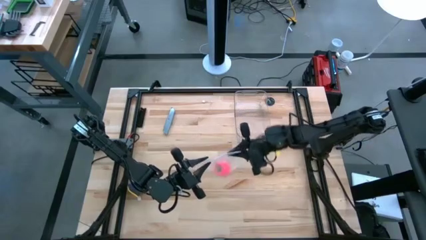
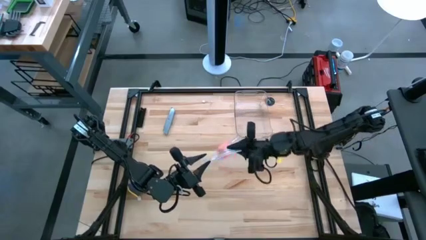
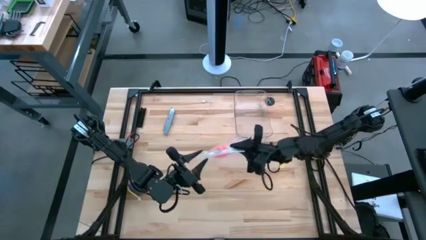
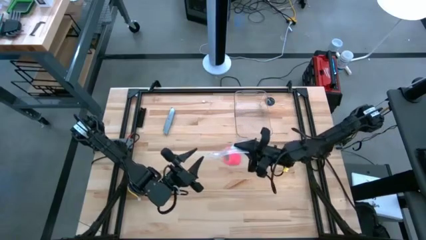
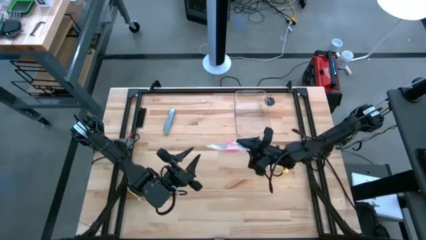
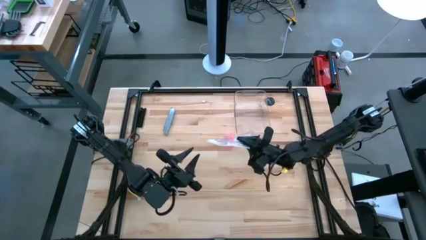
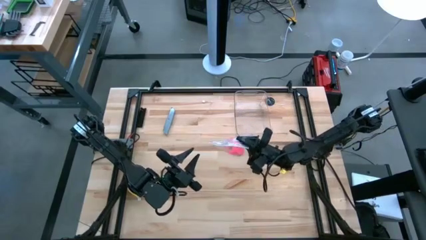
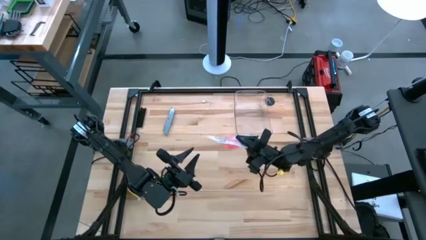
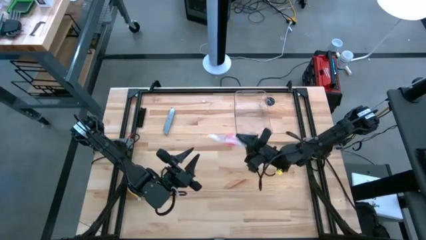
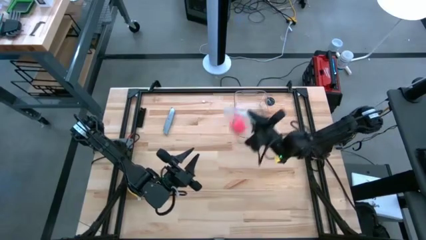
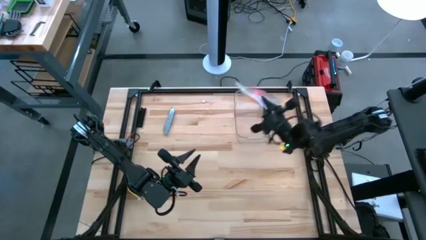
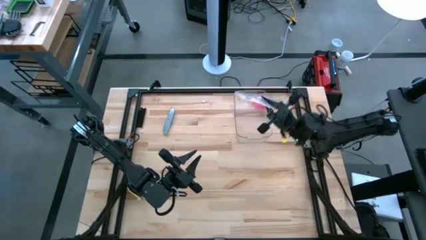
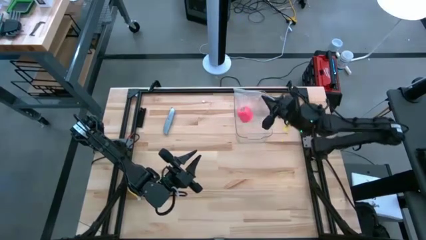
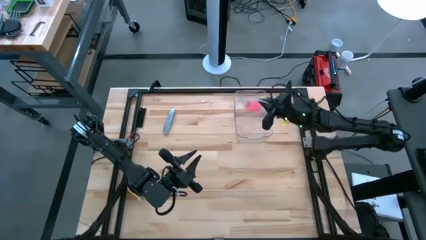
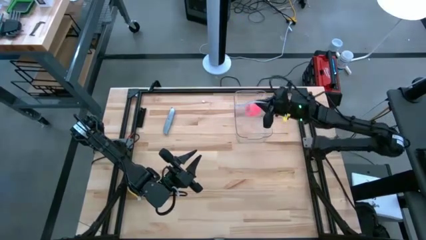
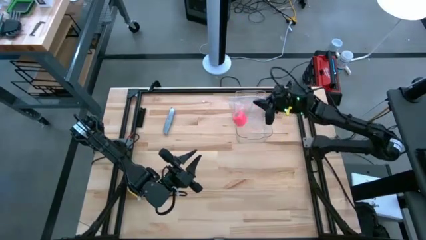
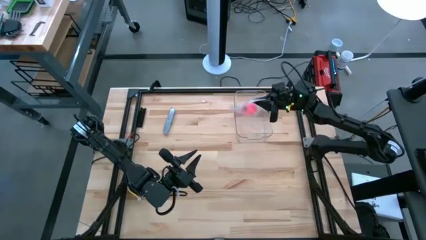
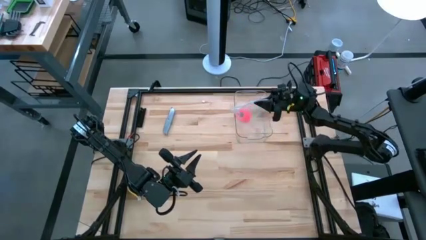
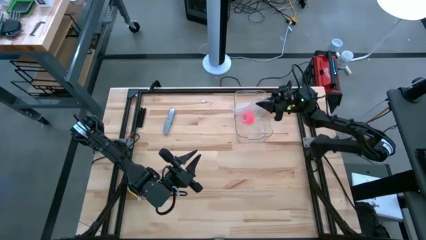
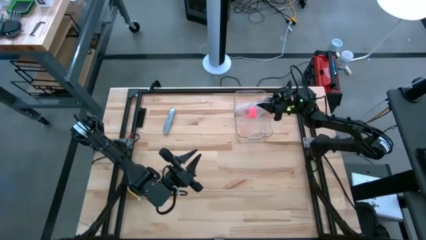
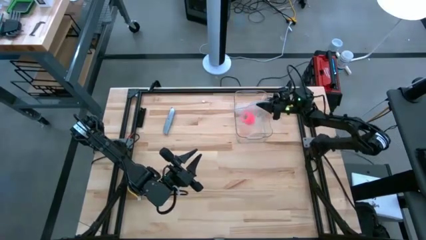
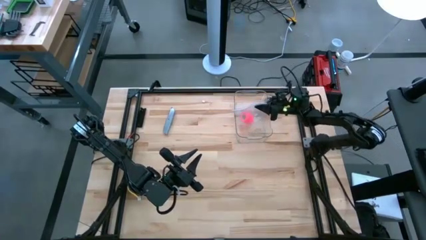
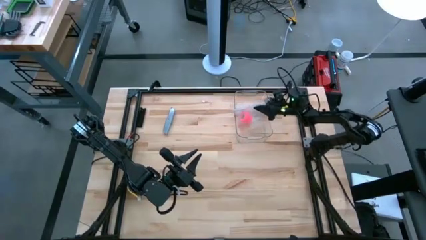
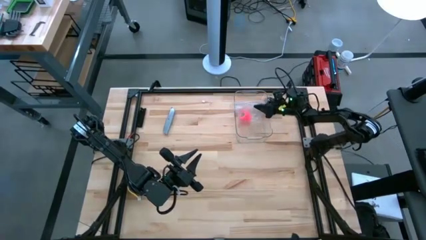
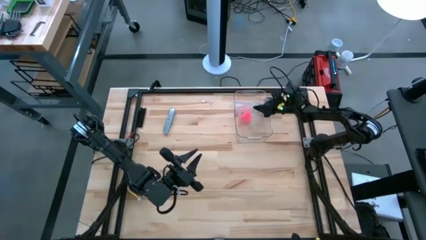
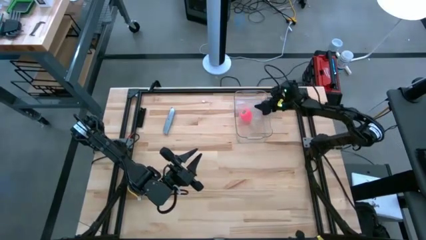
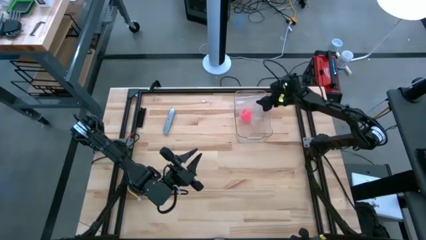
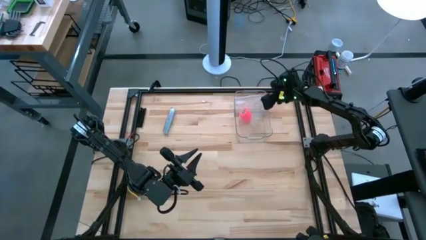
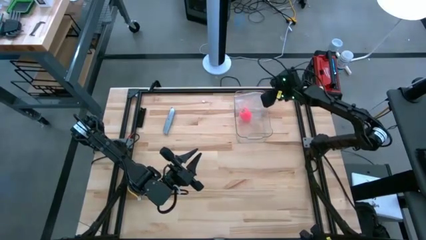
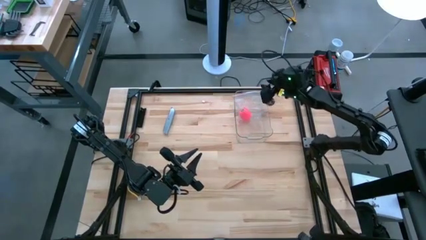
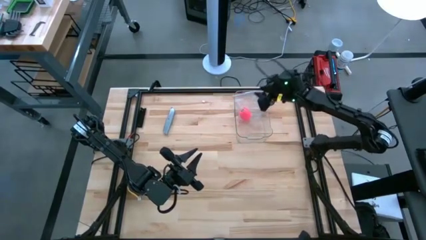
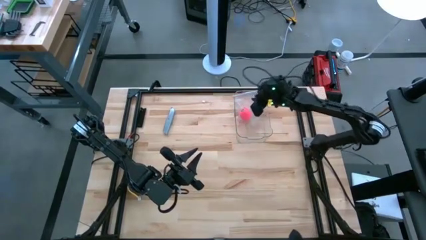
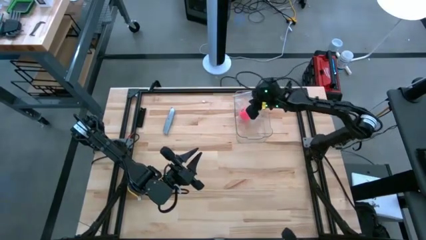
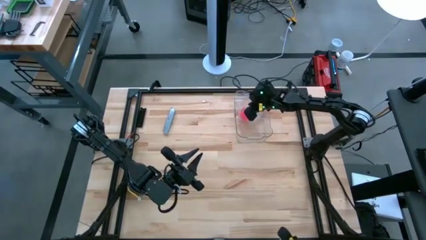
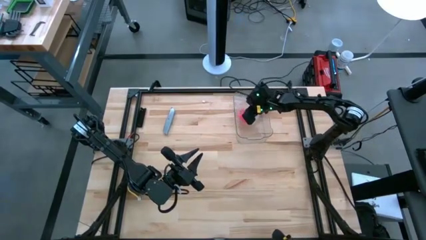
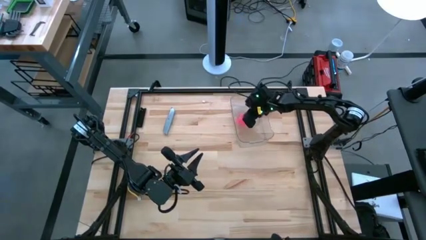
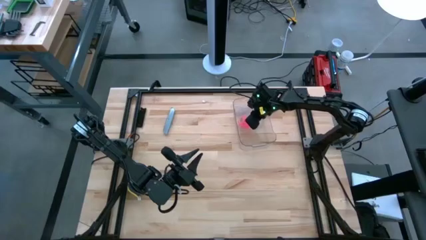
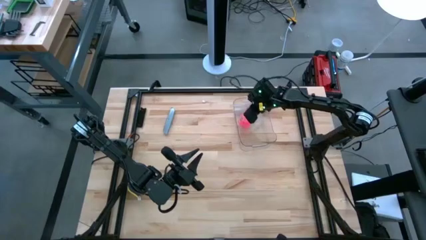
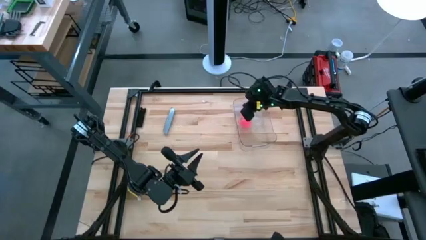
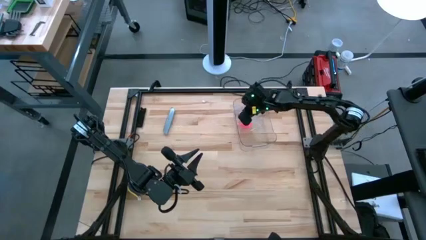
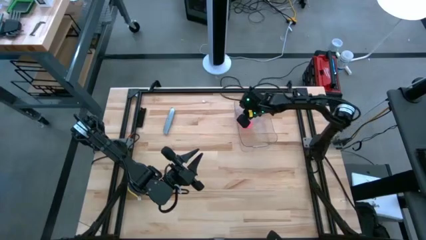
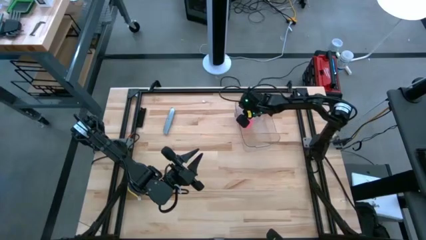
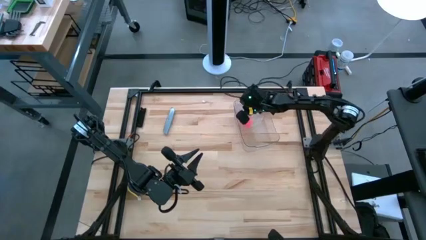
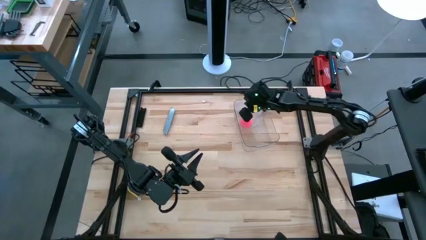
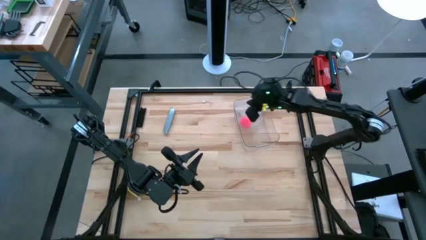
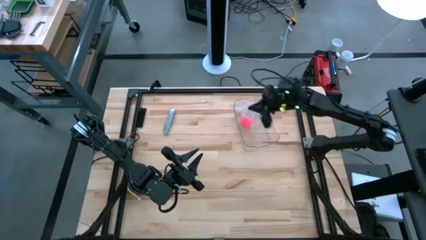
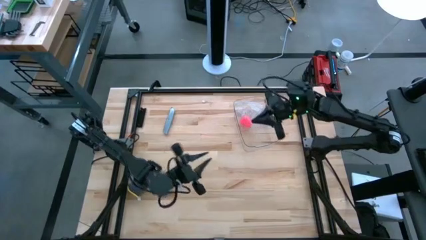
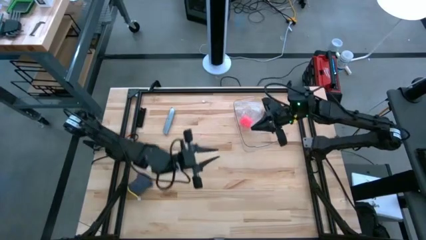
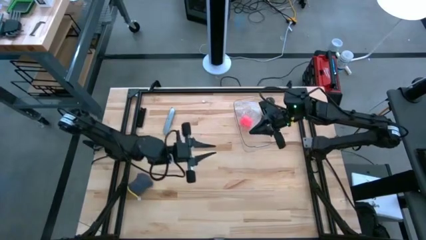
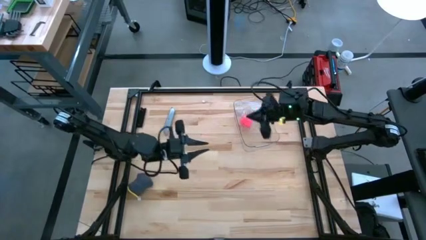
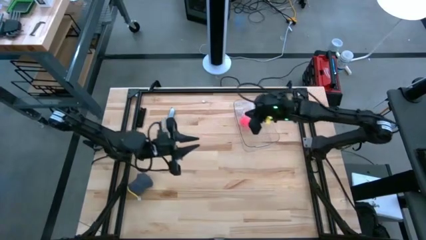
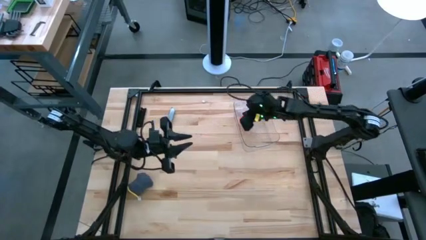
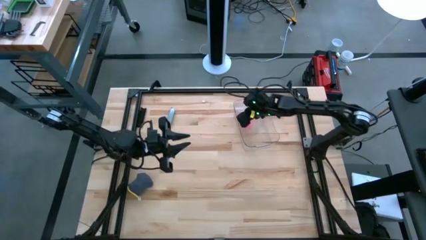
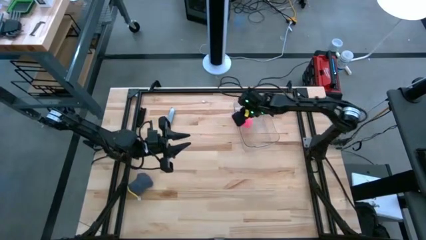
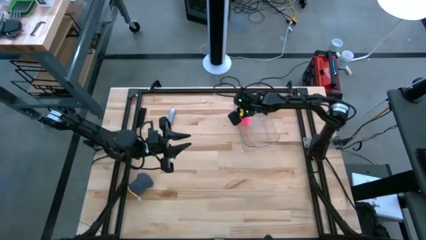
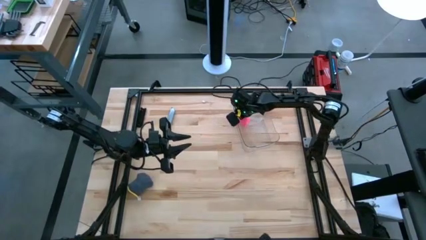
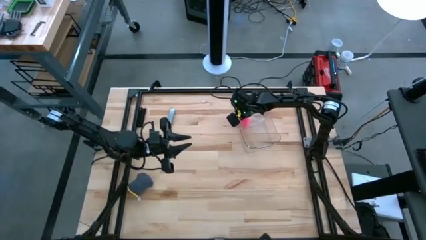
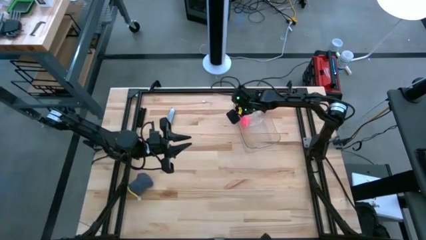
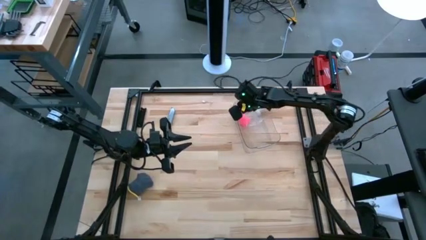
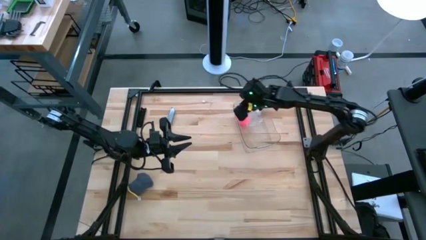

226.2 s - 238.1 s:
Task: Roll bandage
Put the transparent zip bag into the transparent bin

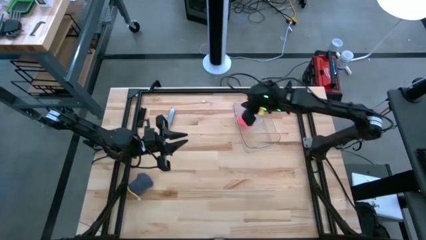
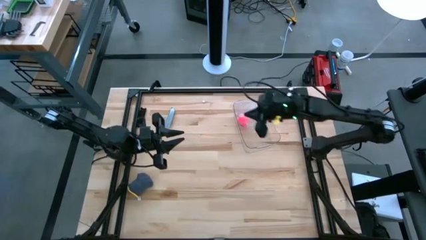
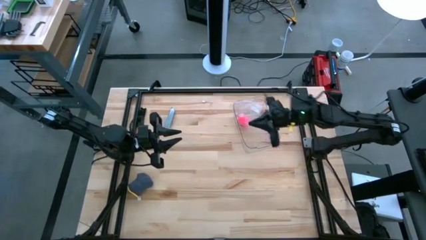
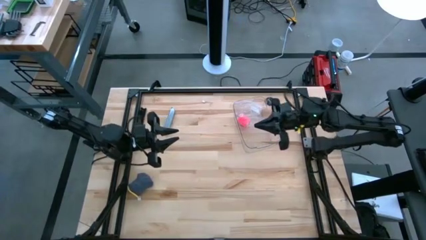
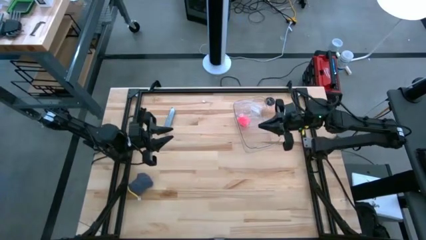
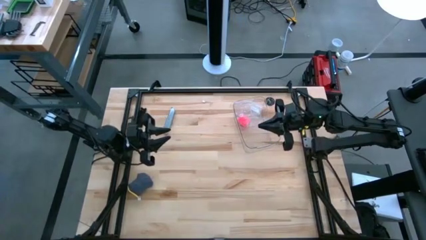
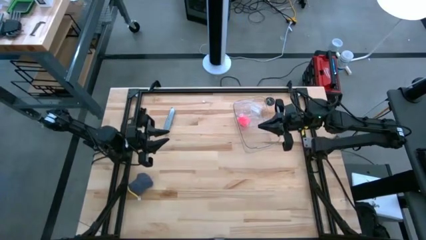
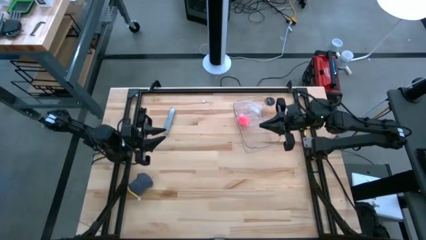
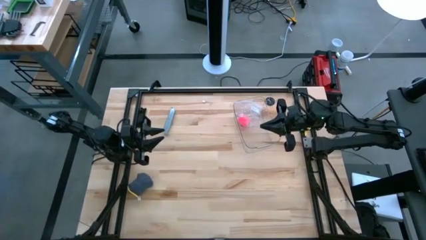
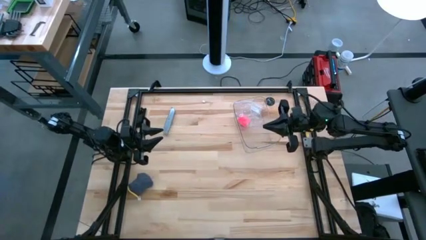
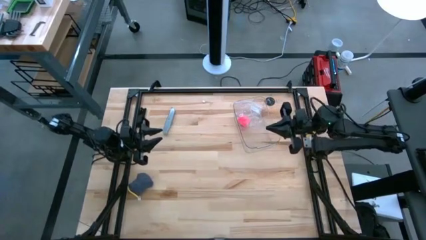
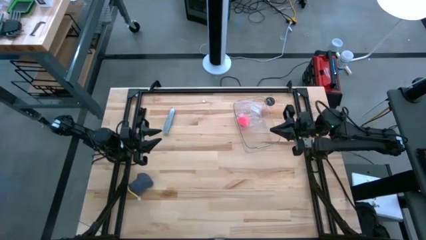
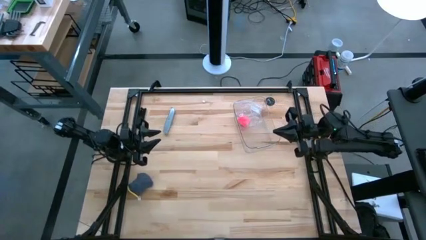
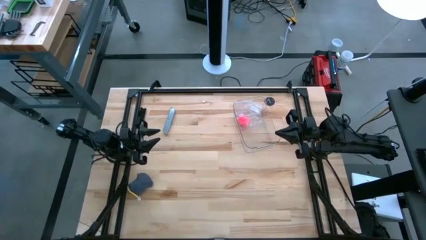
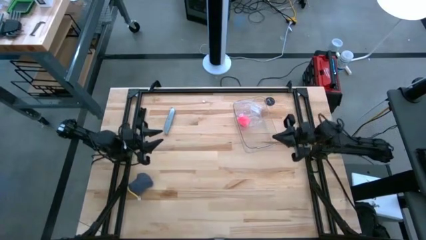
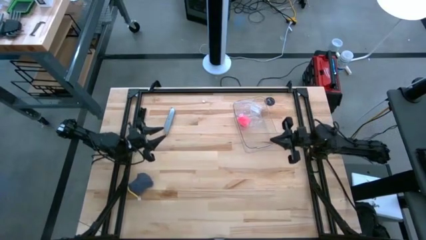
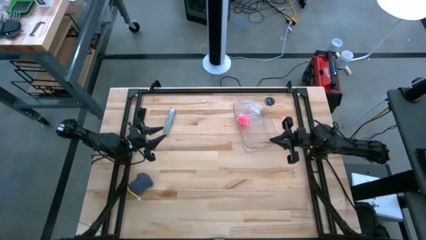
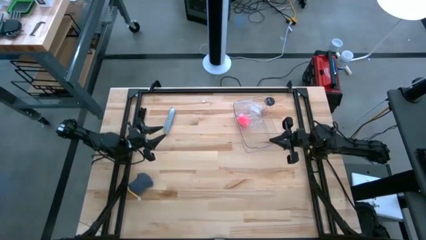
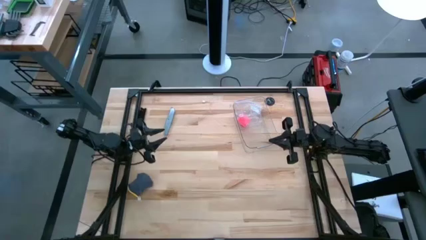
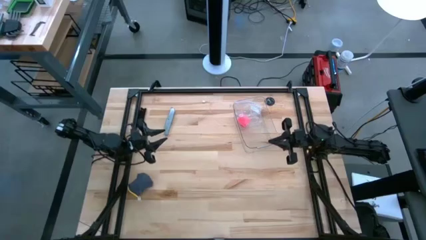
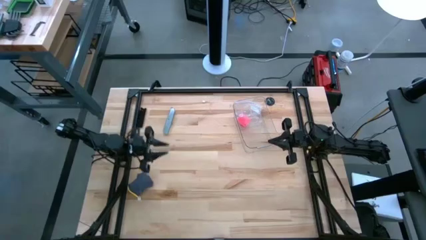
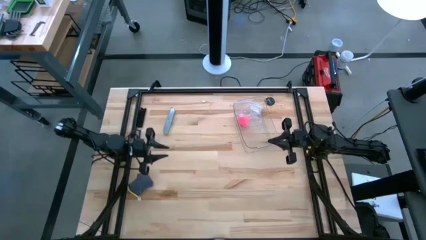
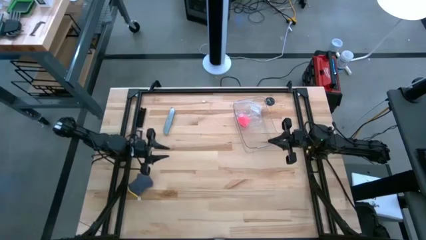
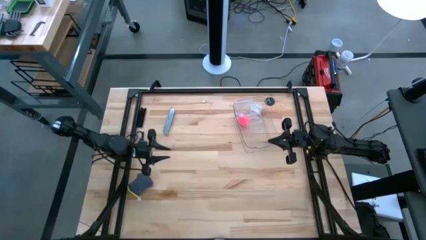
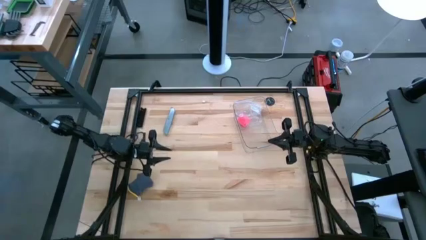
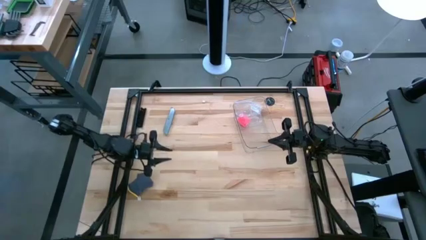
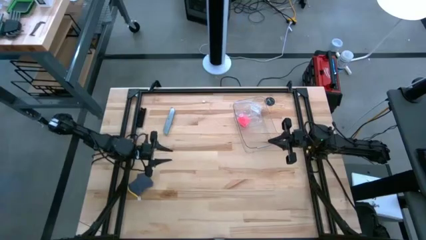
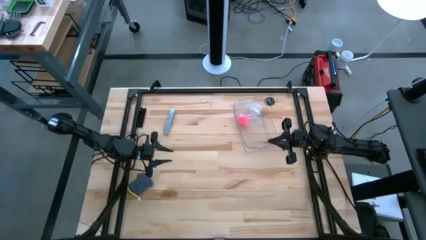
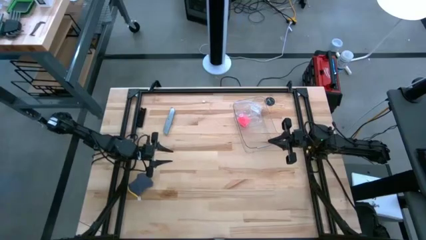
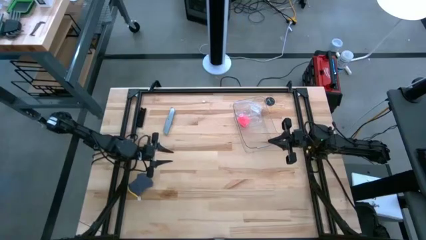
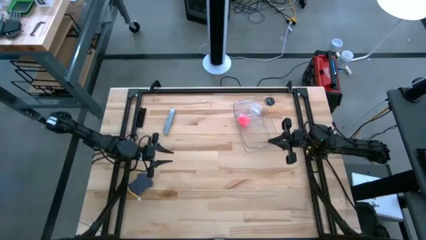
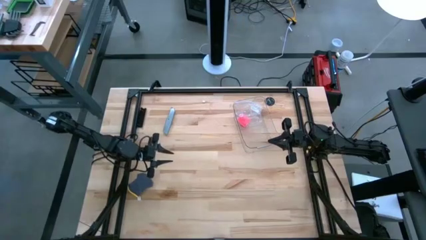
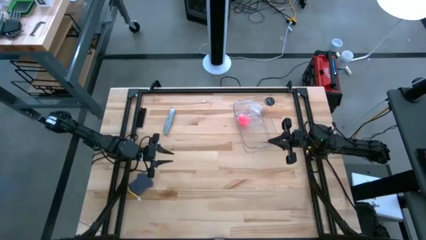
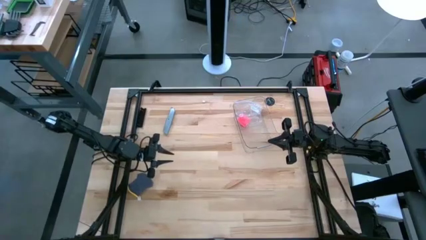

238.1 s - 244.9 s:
Return to Home Position
